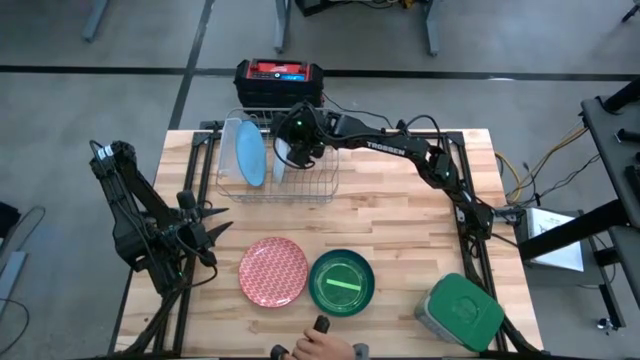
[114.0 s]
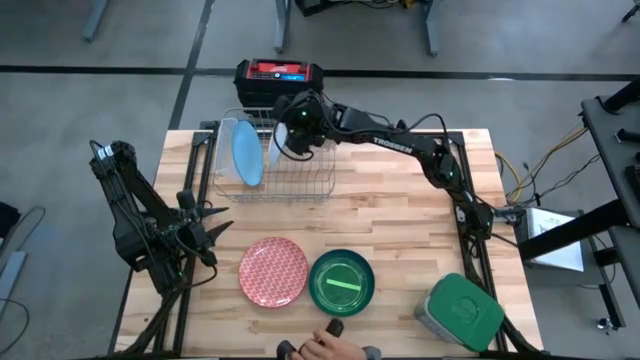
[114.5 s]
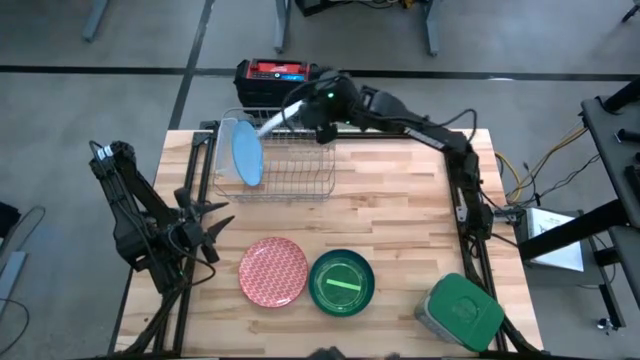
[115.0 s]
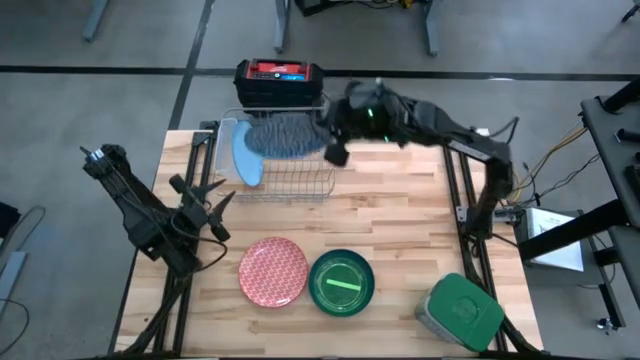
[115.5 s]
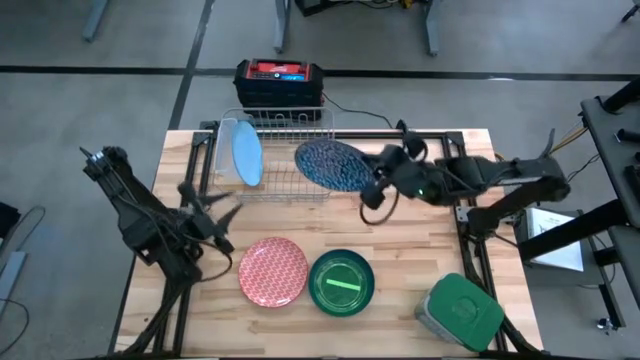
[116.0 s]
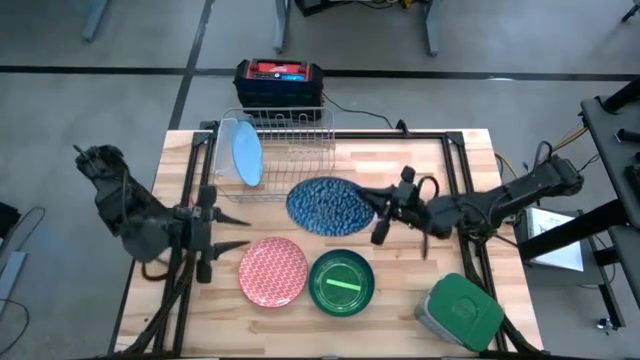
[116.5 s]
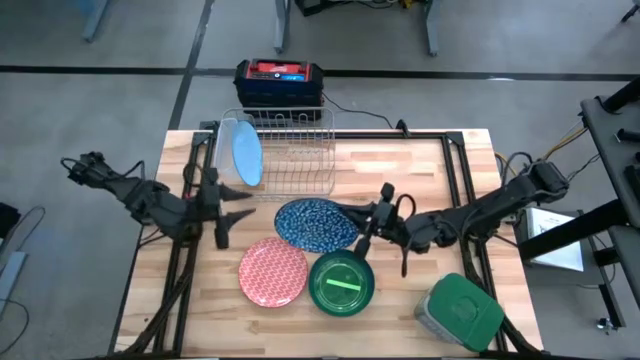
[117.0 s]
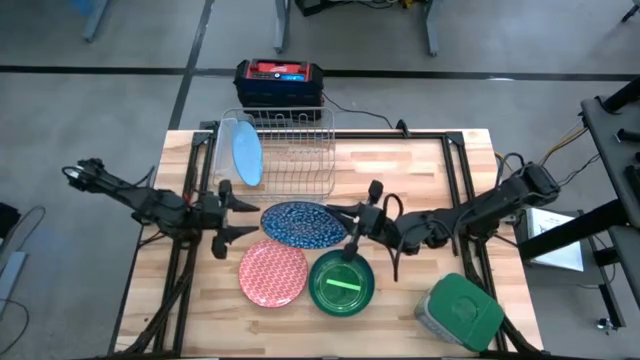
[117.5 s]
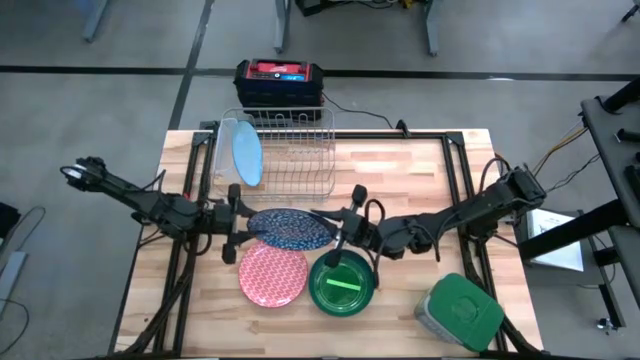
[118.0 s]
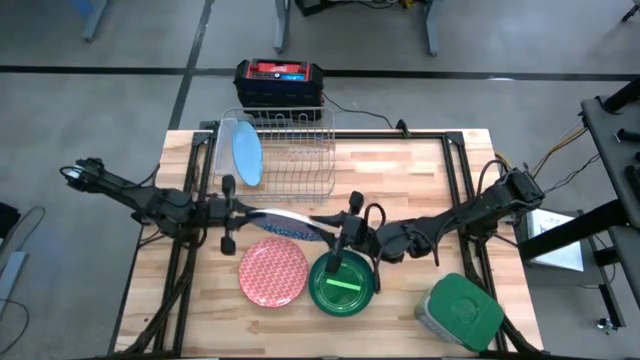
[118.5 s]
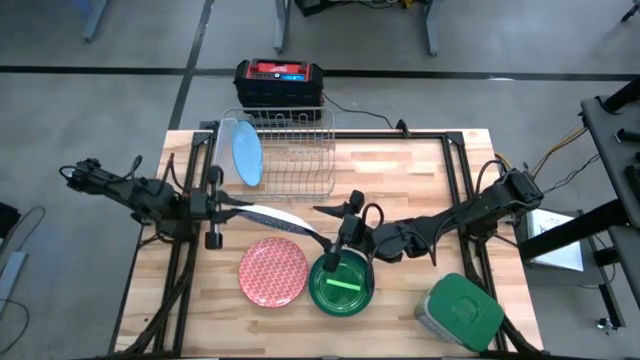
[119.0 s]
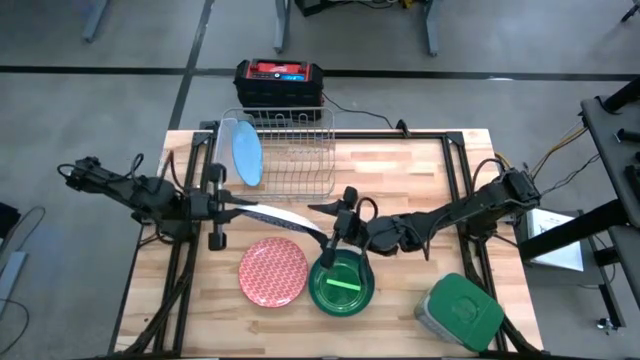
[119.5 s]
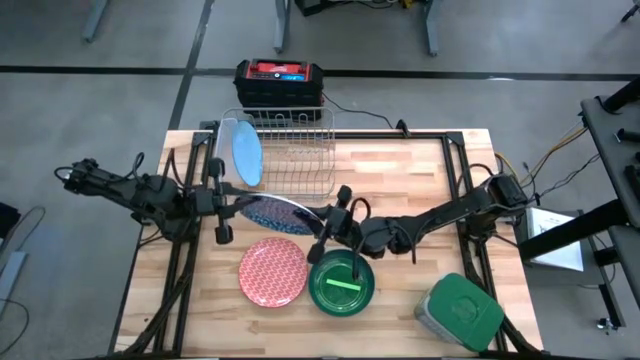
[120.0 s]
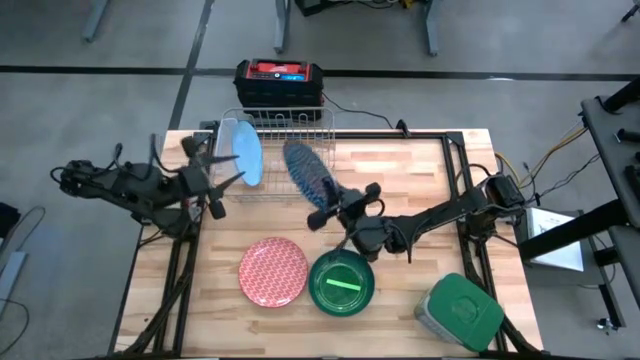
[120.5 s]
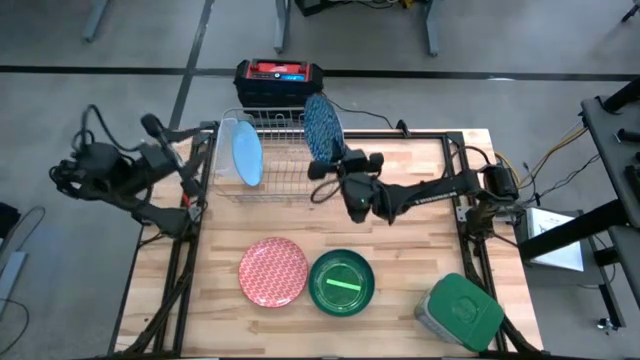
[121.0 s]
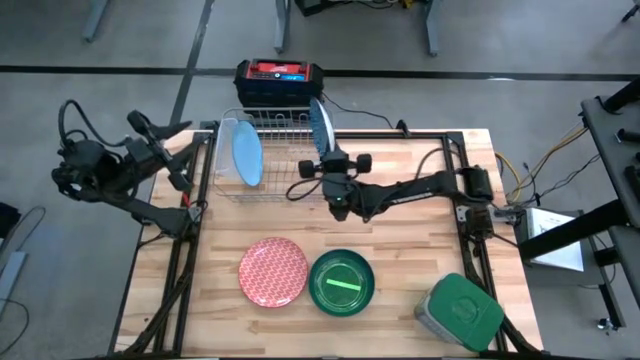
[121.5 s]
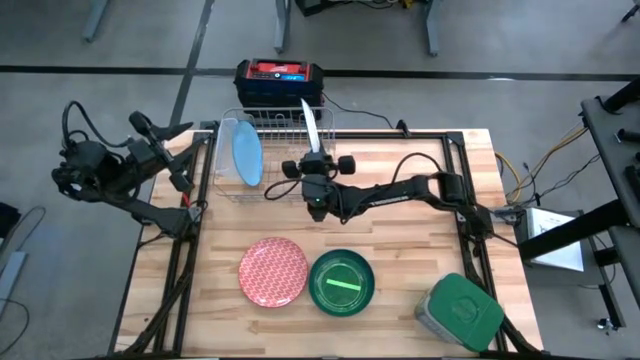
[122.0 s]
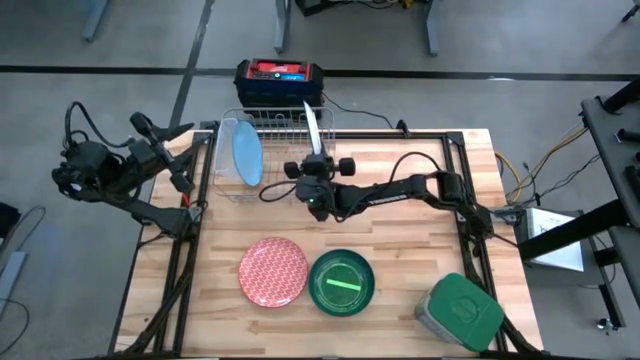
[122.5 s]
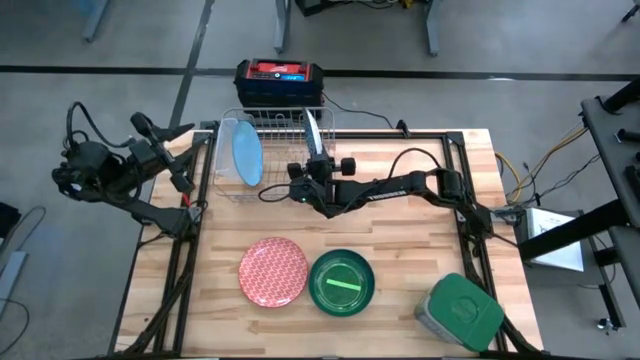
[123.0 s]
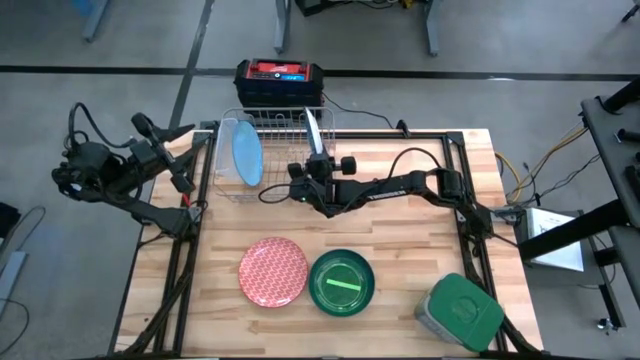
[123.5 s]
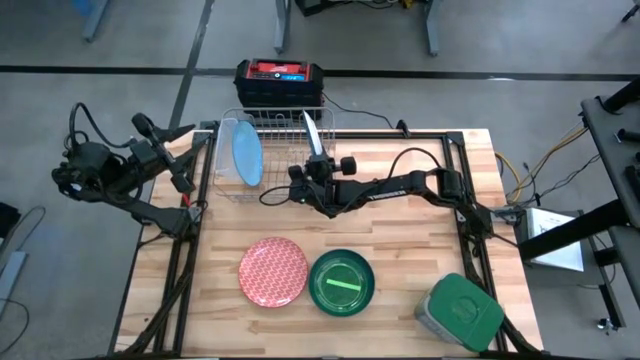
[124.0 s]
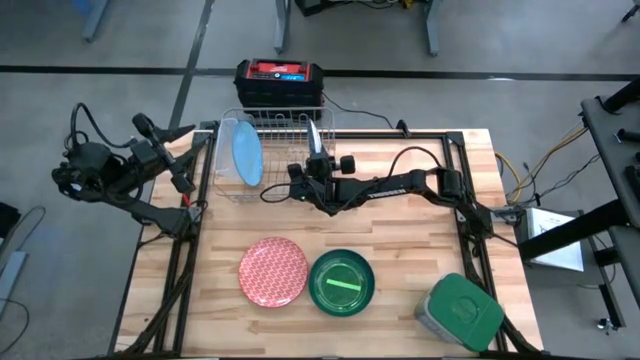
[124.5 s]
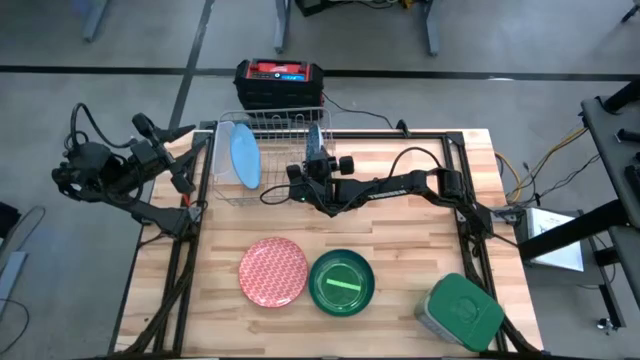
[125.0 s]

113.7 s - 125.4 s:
Task: Sort dishes
Put the blue patterned plate into the dish rack

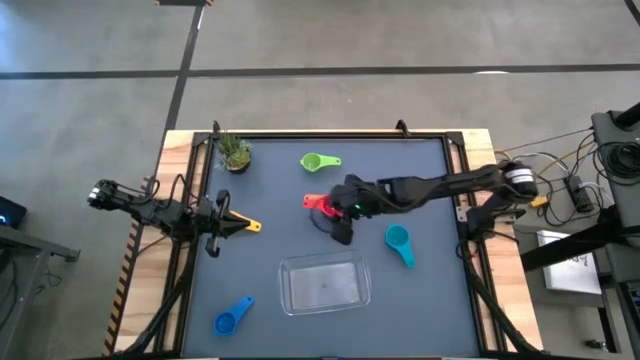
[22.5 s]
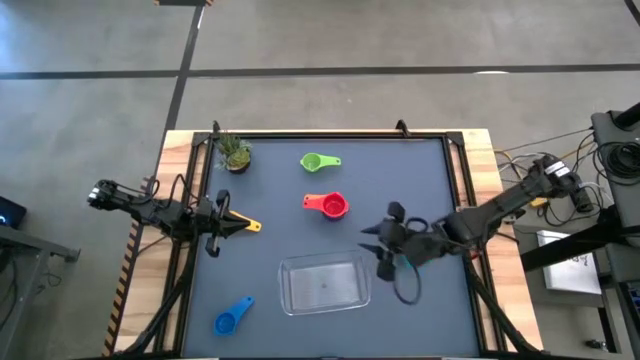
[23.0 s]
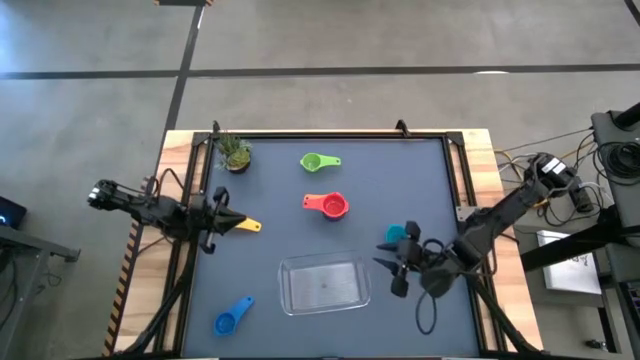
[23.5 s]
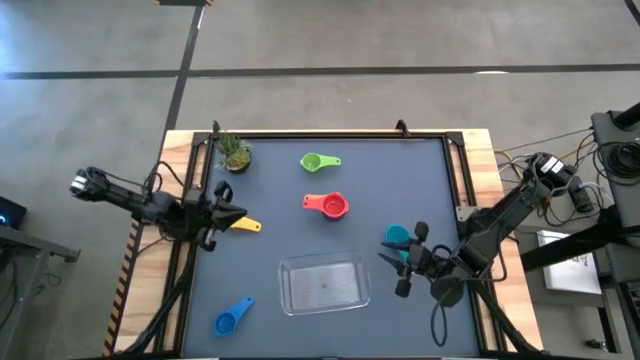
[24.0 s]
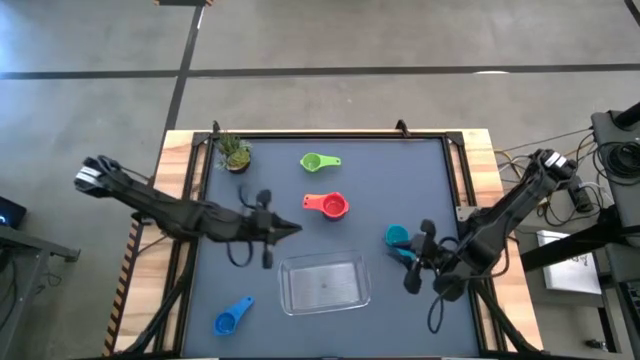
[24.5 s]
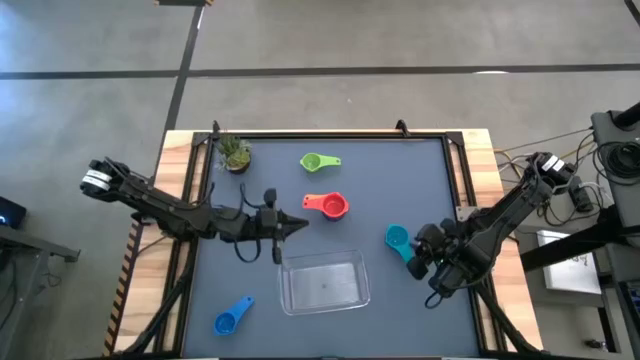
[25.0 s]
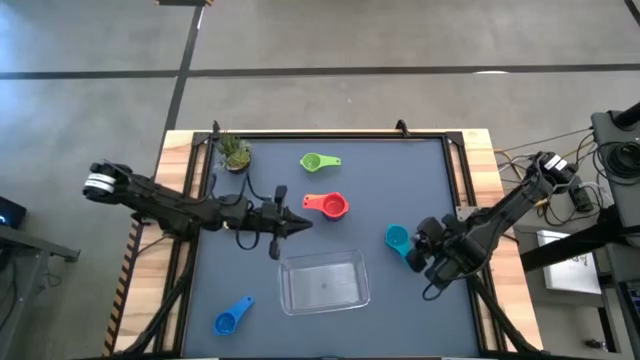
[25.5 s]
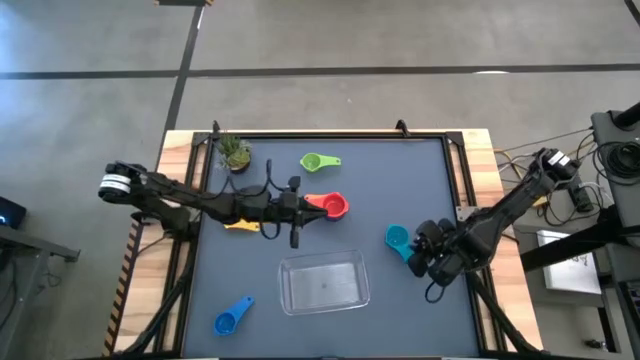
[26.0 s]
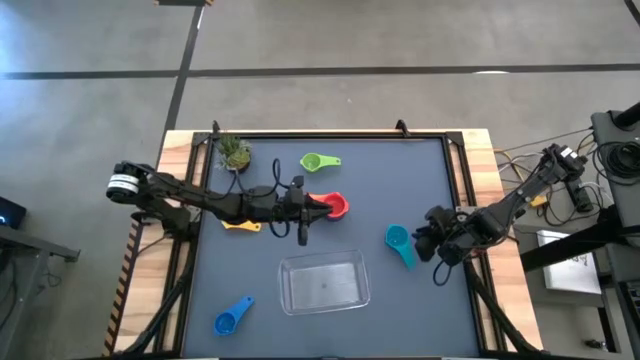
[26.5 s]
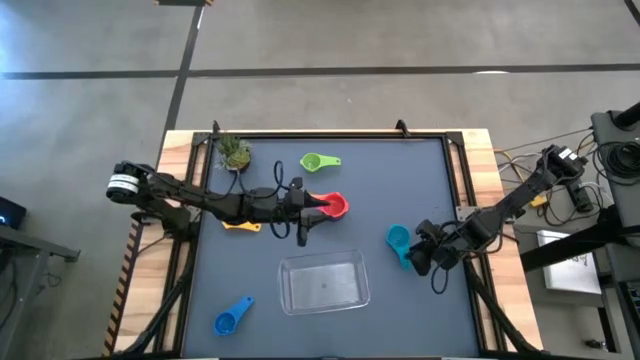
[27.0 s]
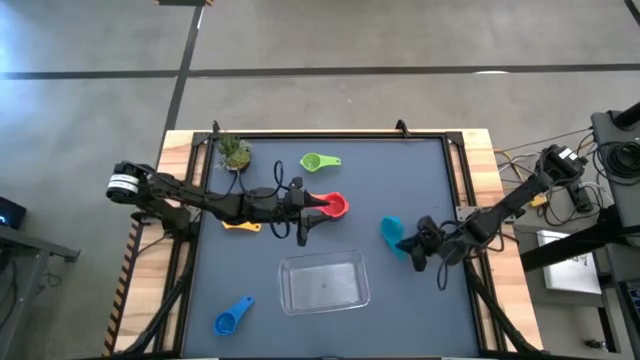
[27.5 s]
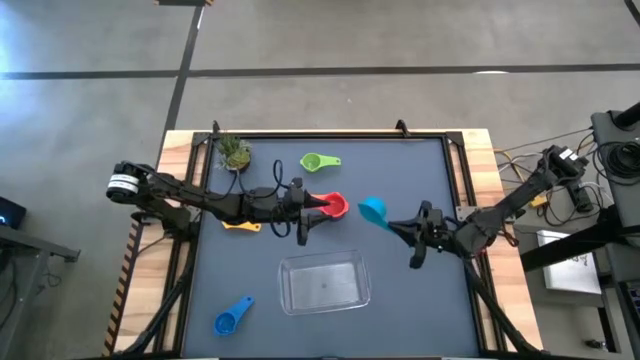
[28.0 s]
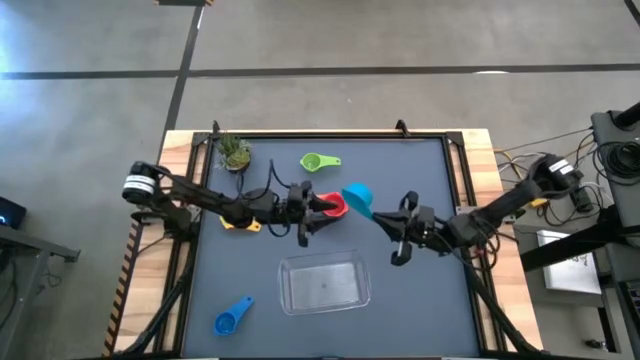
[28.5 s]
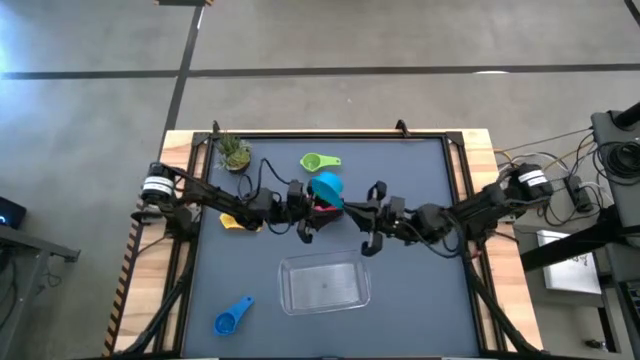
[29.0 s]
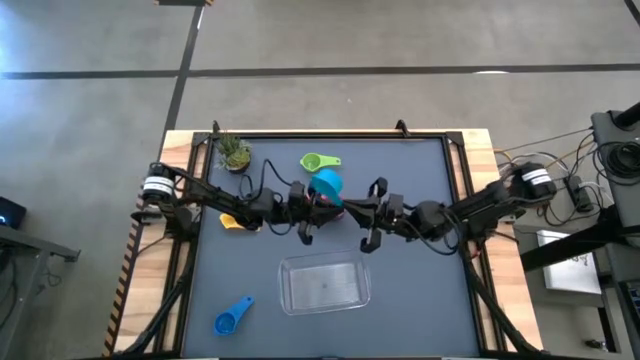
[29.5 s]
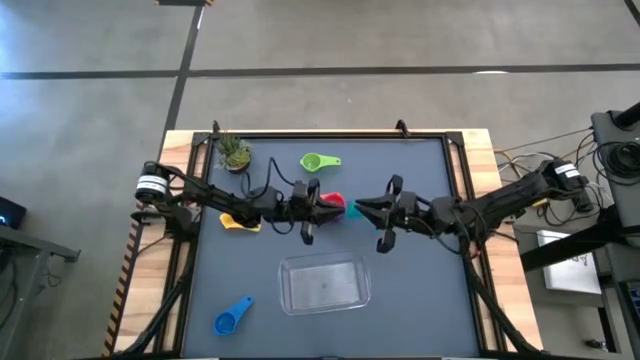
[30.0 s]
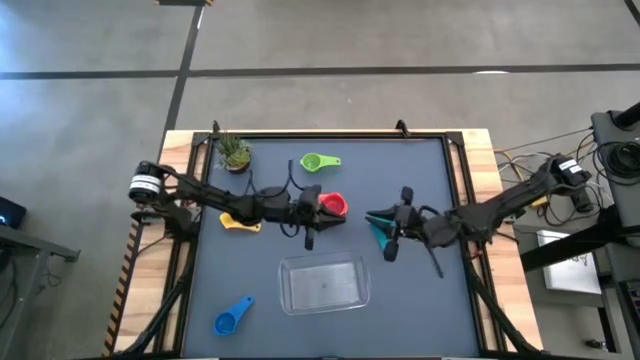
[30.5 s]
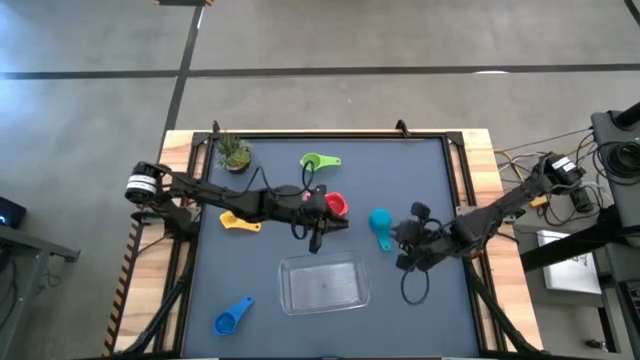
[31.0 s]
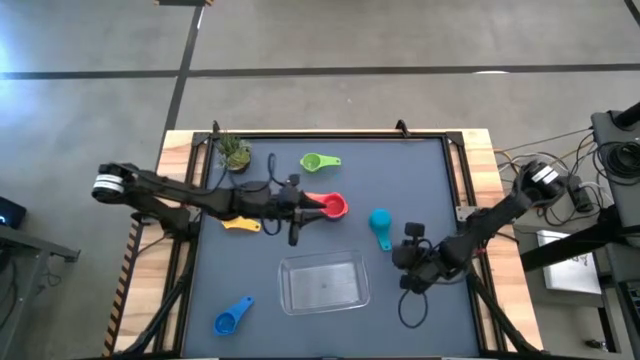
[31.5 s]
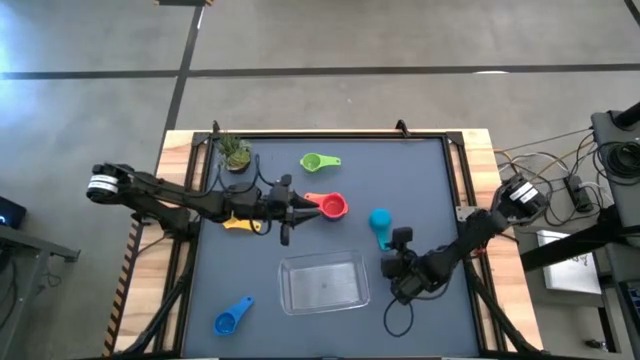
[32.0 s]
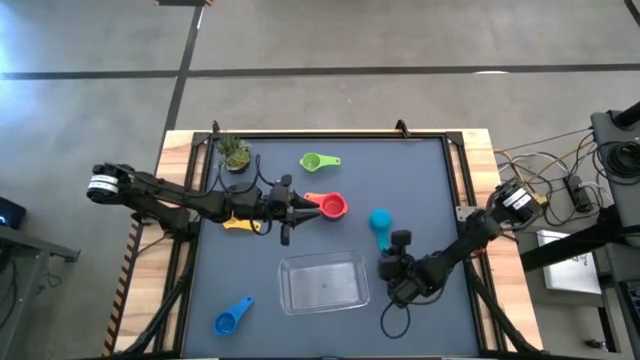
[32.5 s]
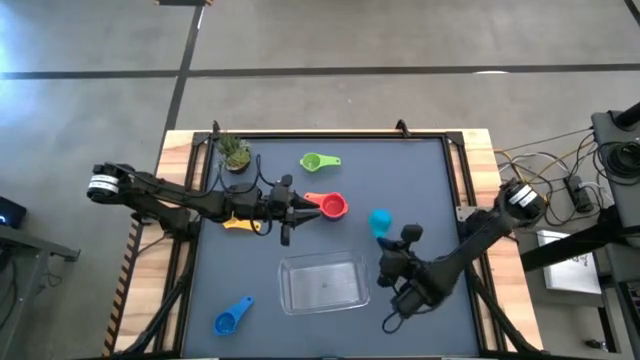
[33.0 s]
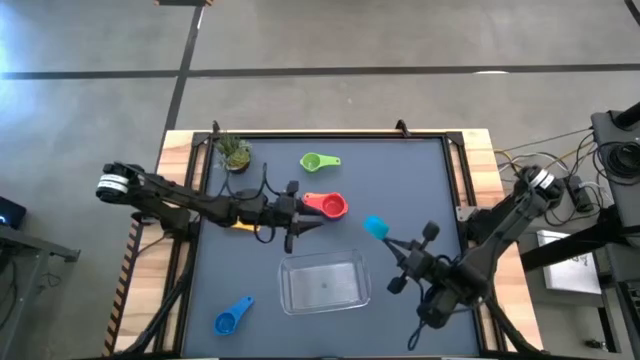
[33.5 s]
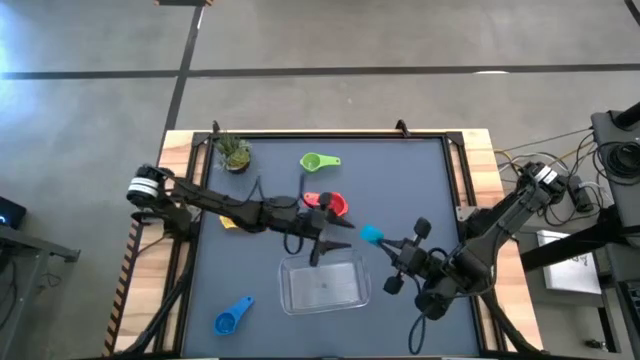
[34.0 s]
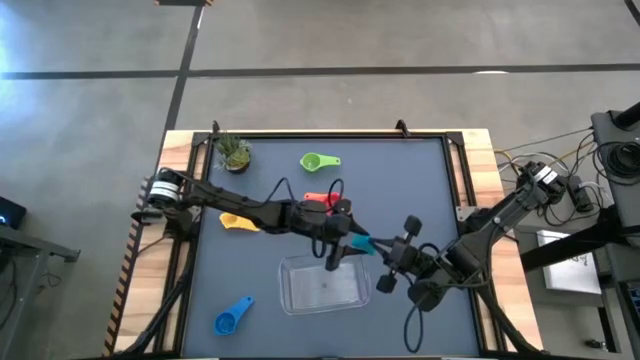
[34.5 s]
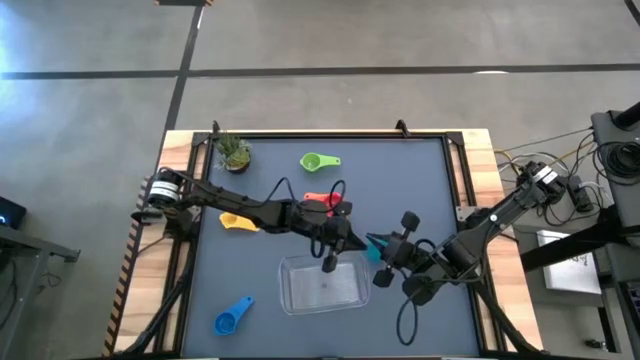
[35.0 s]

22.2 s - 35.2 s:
Task: Nest measuring cups in basket
Stack the light blue measuring cup on top of the red measuring cup
